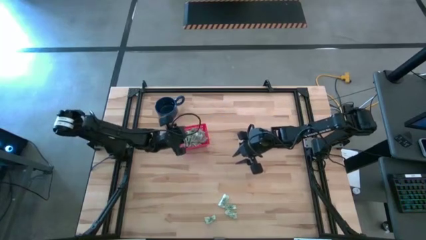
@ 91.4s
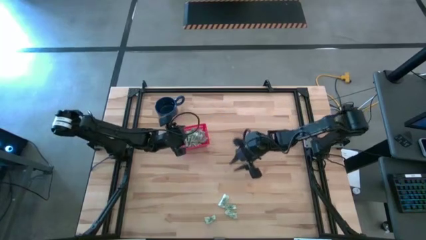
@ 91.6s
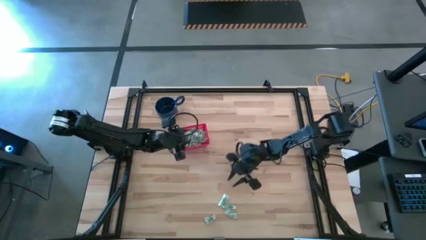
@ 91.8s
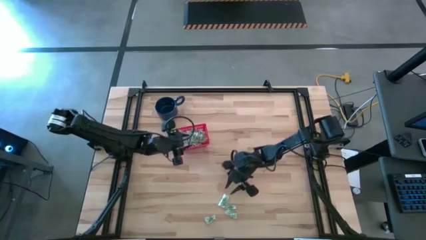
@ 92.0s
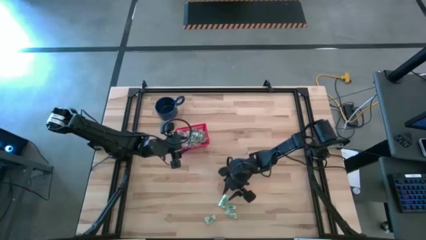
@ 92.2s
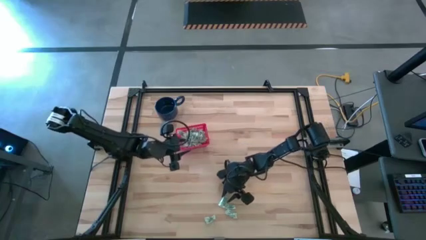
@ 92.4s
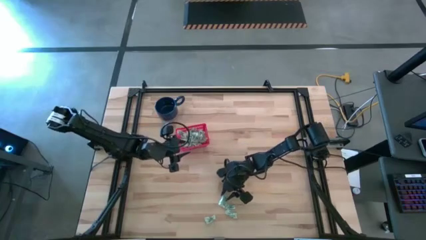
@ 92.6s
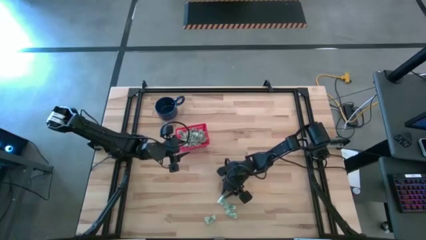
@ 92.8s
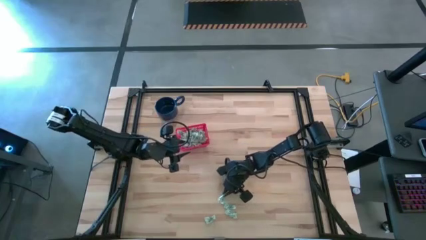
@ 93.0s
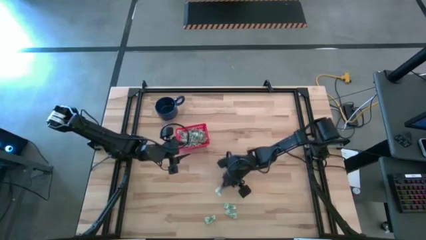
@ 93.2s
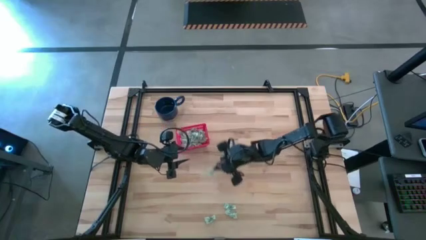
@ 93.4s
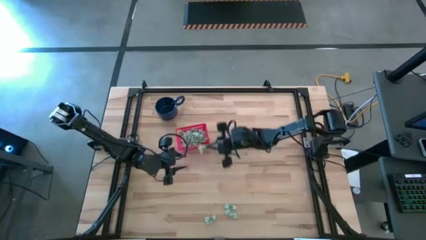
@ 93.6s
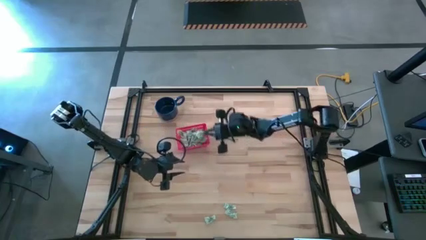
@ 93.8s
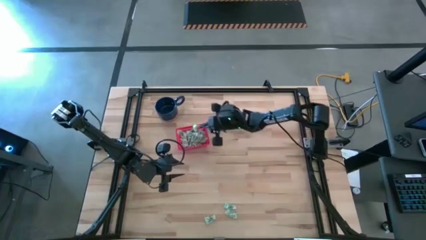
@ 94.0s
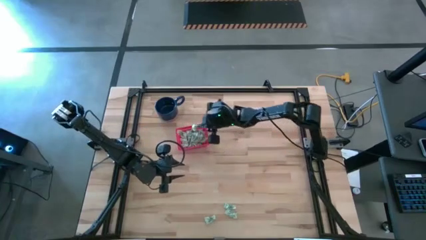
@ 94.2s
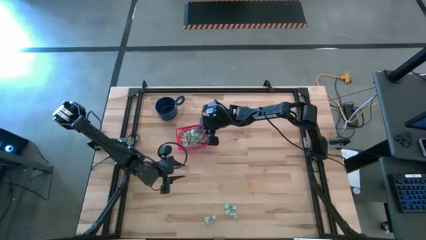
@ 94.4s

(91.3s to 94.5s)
Task: Pick and place items into bin
Put the green stevia packet into the red bin

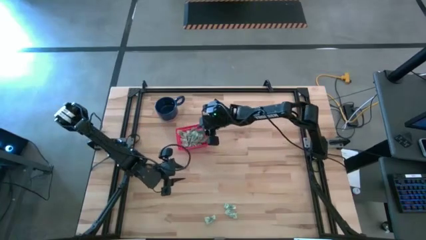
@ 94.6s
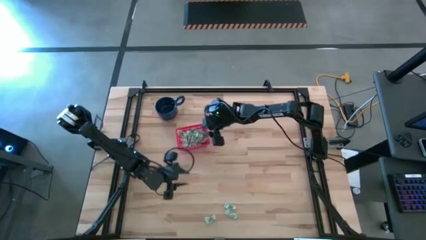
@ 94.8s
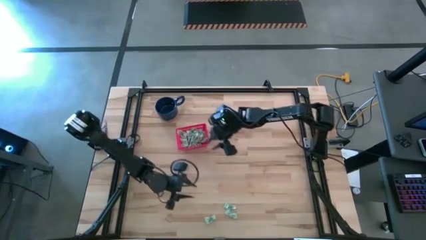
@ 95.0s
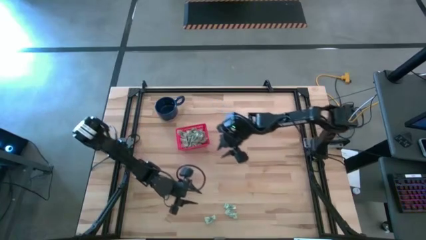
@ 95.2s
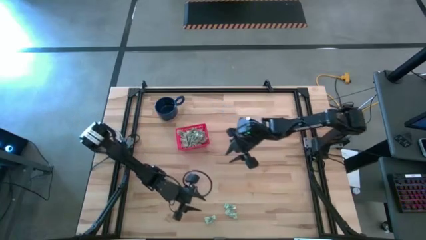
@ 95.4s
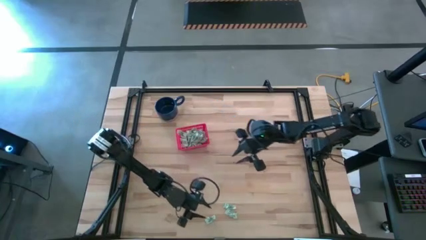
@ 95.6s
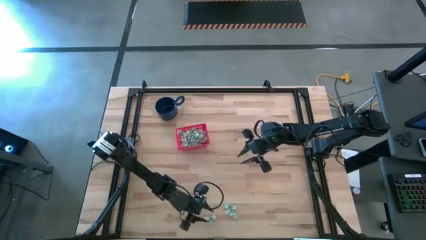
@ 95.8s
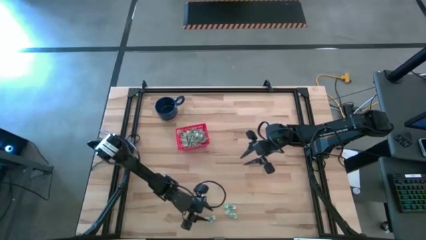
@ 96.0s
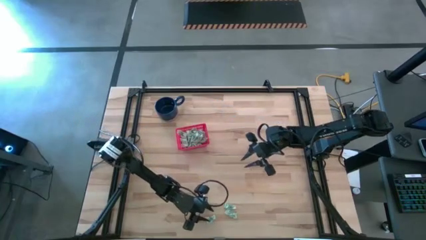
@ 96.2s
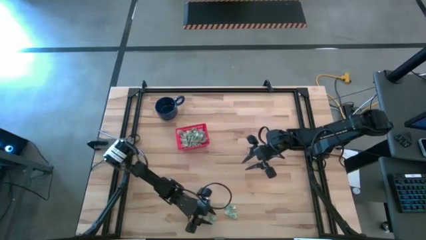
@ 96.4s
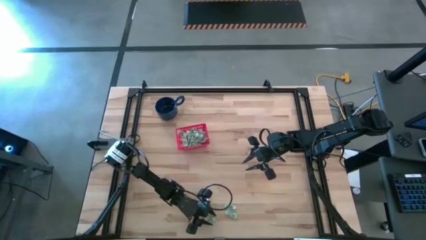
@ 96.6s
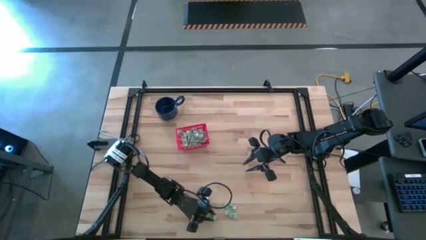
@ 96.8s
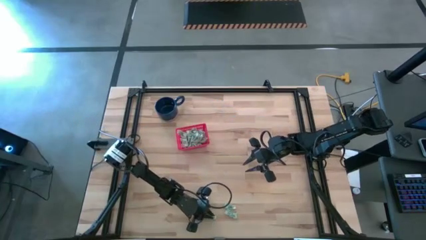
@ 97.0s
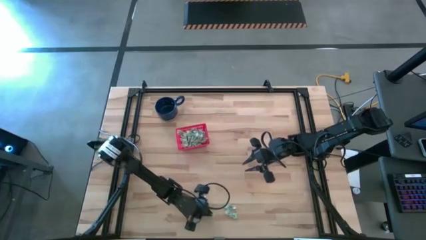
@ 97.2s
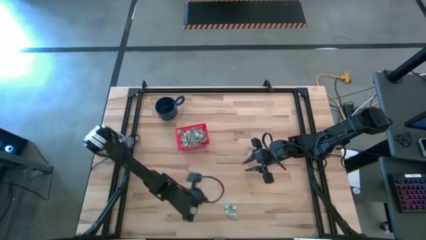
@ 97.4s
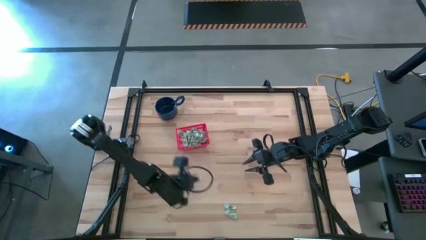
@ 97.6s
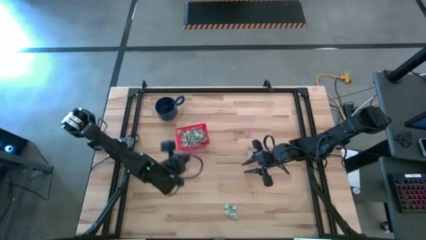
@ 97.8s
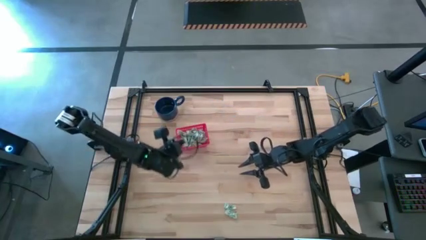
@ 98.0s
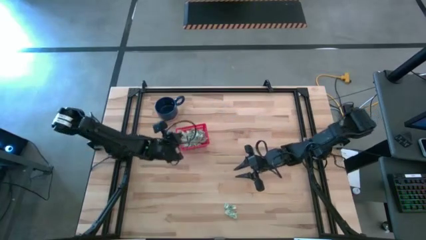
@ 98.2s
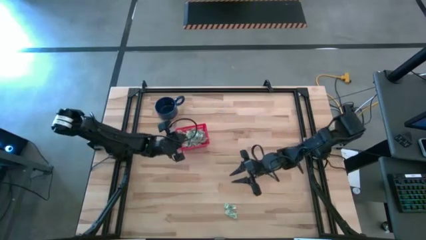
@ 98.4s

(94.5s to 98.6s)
Put the green stevia packet into the red bin

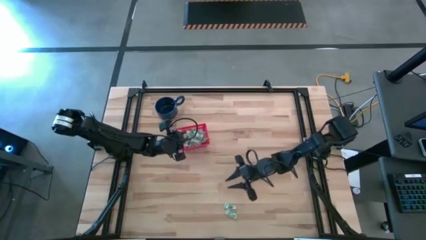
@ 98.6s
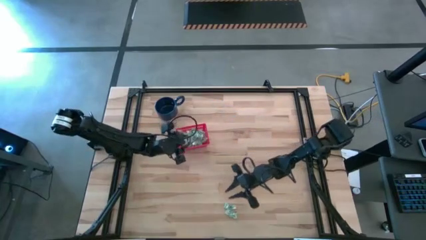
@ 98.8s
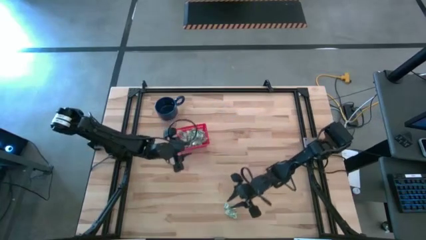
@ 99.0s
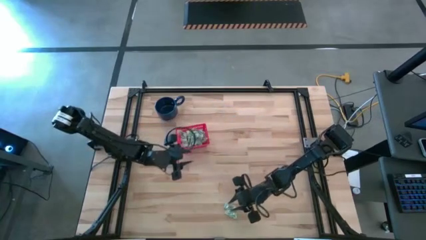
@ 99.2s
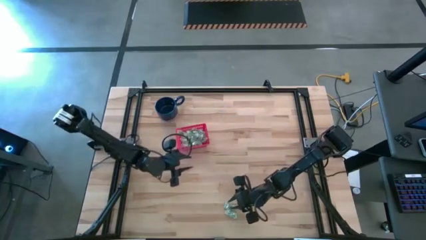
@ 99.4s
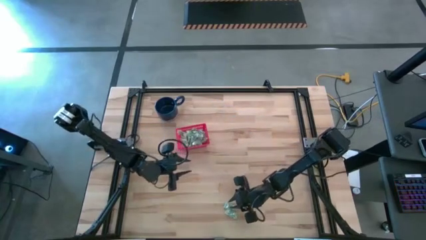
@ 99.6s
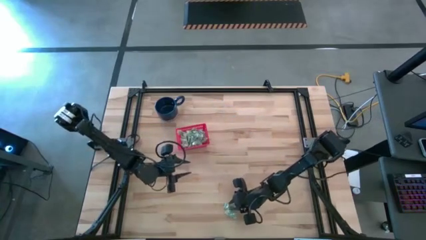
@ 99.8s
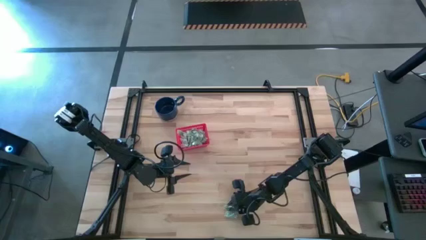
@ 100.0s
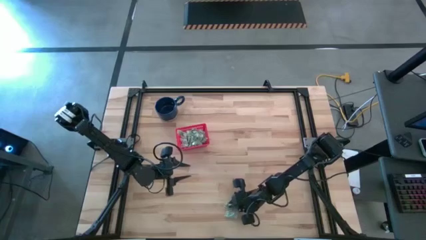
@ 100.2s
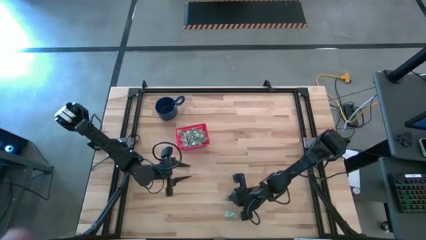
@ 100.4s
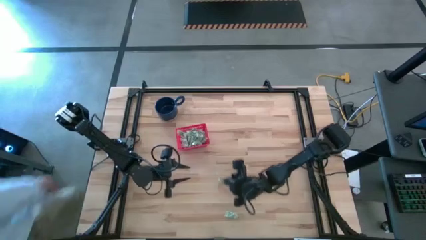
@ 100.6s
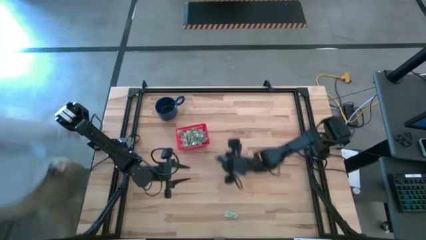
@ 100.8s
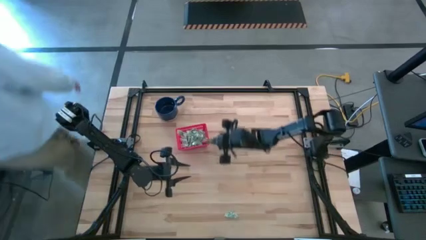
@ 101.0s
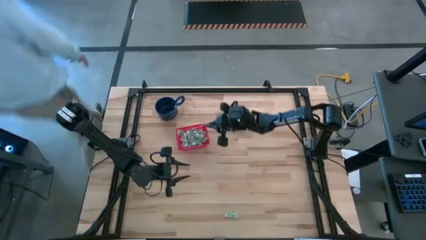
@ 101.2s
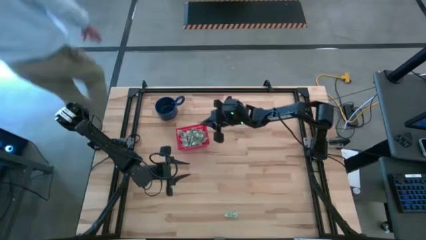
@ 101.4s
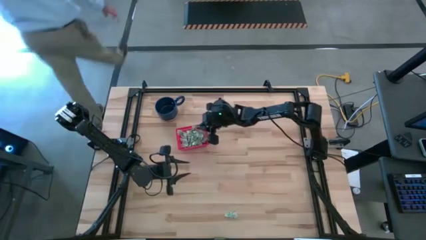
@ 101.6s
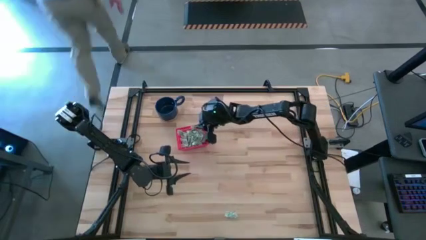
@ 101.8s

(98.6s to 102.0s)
Put the green stevia packet into the red bin

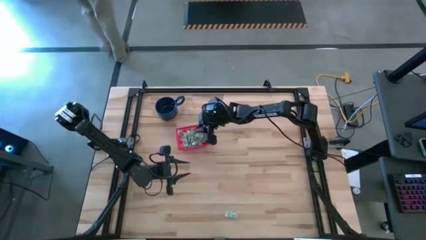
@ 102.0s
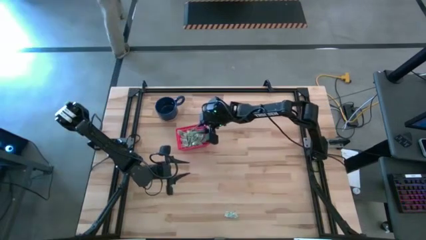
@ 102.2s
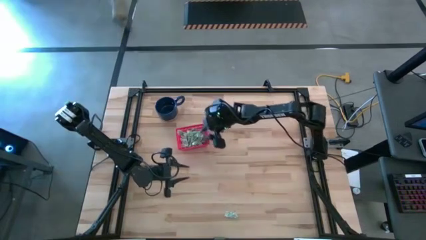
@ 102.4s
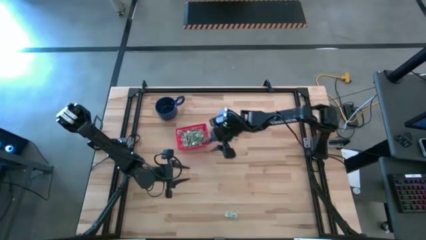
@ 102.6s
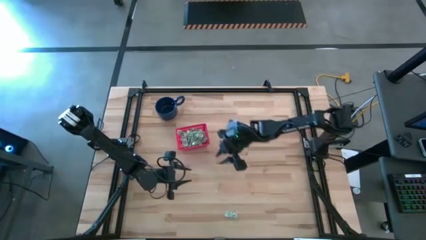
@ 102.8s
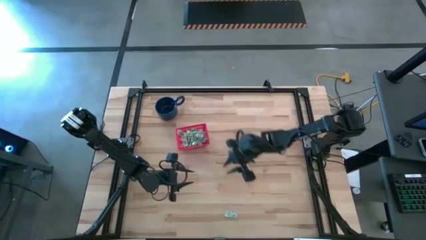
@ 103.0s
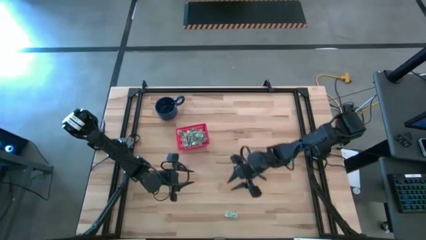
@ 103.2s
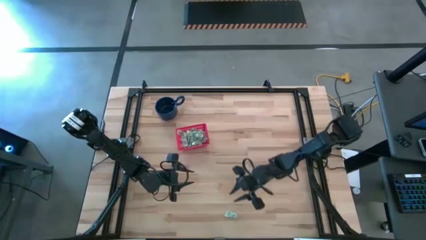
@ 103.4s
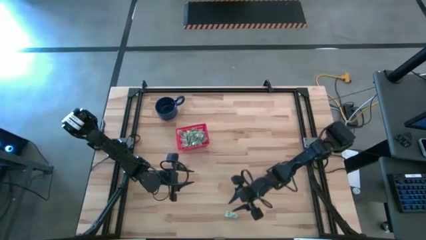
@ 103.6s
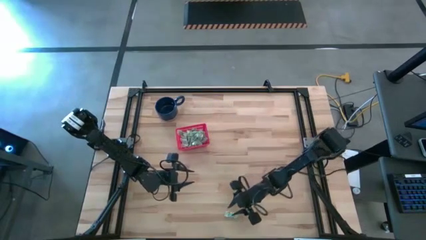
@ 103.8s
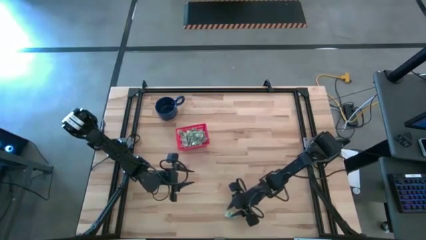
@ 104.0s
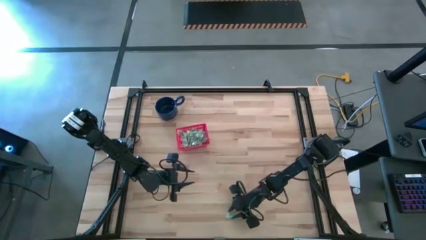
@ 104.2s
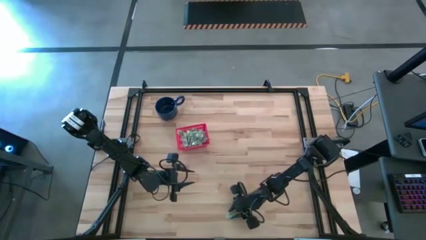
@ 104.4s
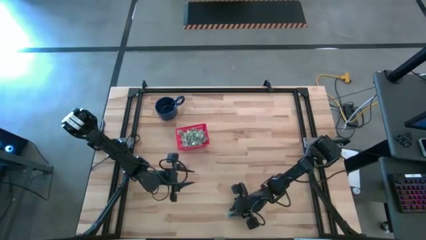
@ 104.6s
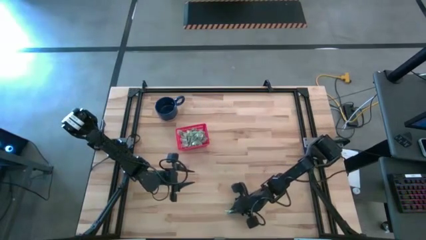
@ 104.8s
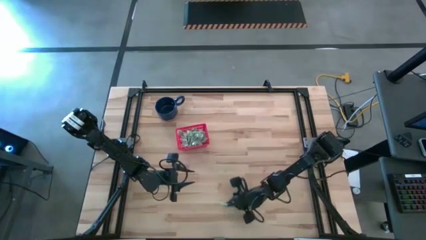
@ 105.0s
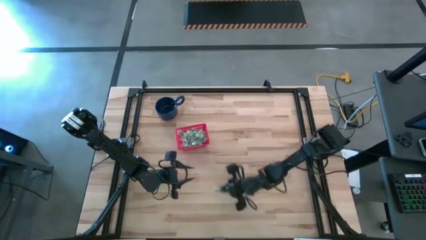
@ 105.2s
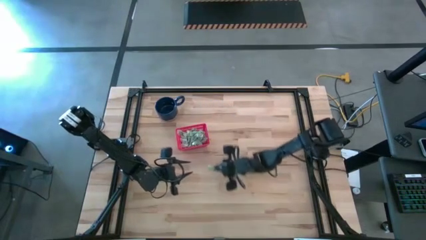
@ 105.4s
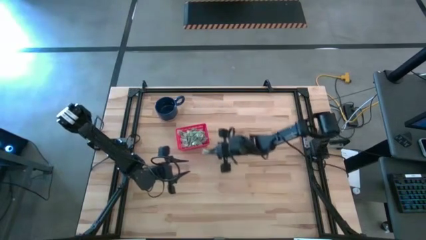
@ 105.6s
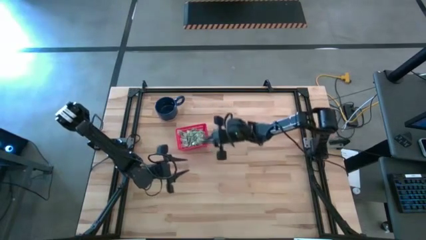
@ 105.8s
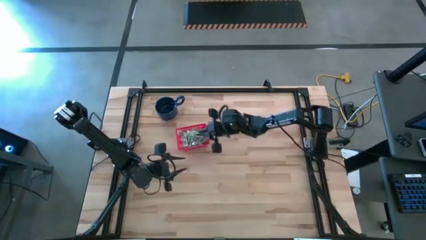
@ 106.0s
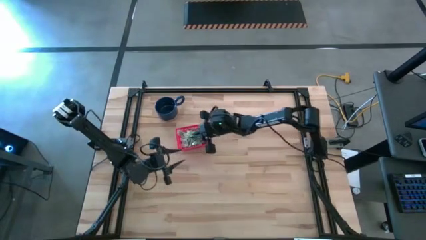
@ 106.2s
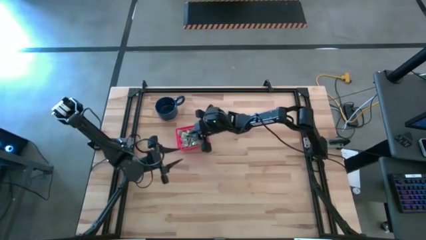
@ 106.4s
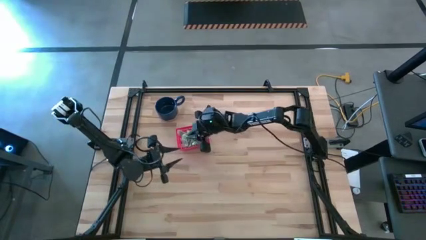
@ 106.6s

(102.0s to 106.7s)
Put the green stevia packet into the red bin

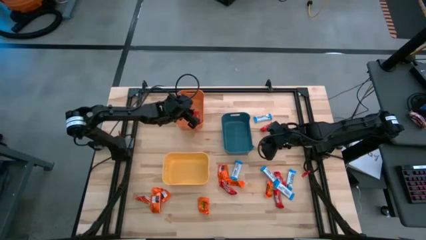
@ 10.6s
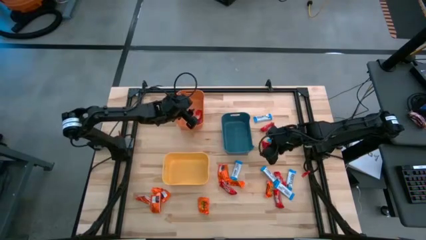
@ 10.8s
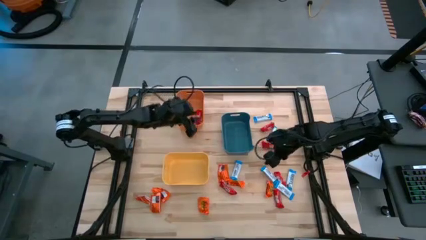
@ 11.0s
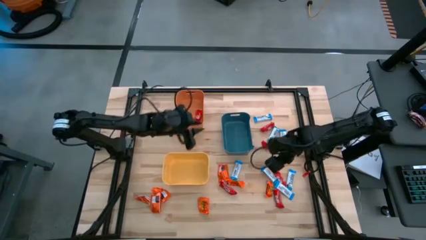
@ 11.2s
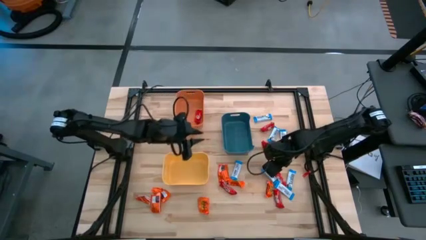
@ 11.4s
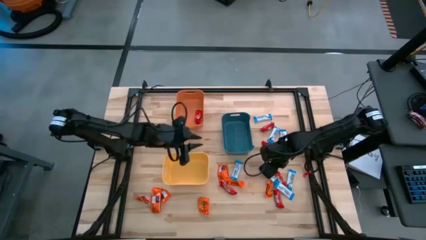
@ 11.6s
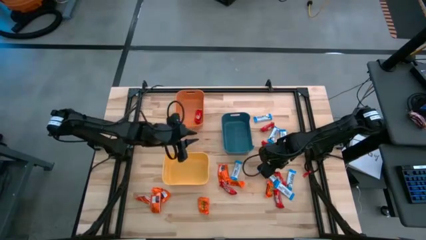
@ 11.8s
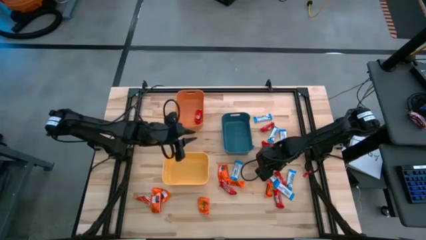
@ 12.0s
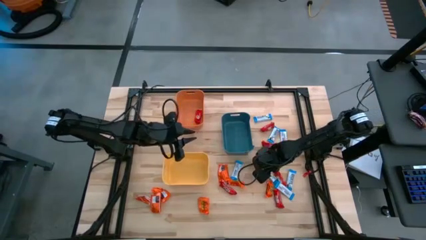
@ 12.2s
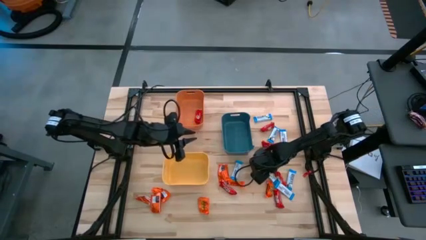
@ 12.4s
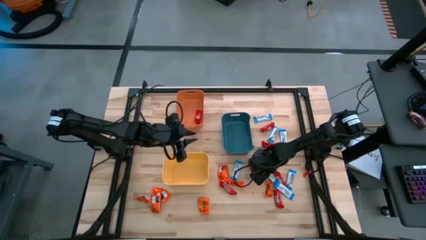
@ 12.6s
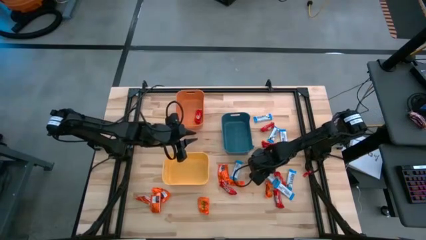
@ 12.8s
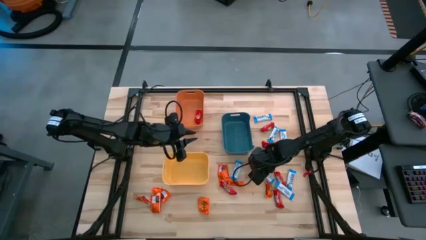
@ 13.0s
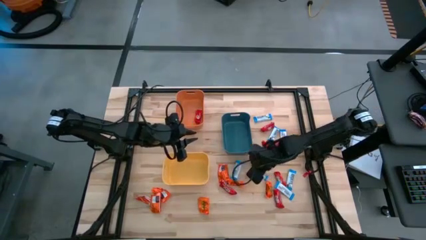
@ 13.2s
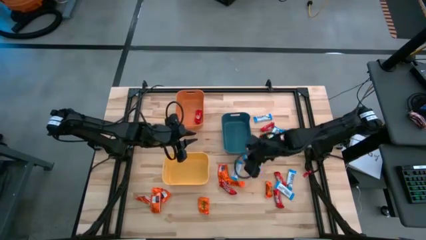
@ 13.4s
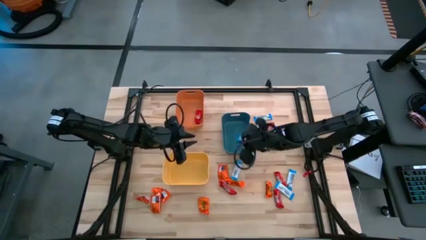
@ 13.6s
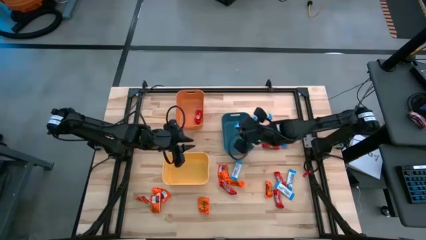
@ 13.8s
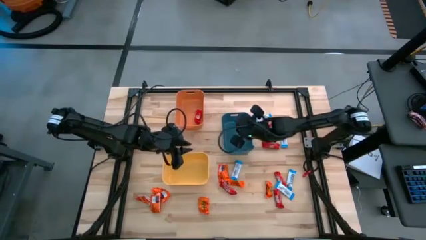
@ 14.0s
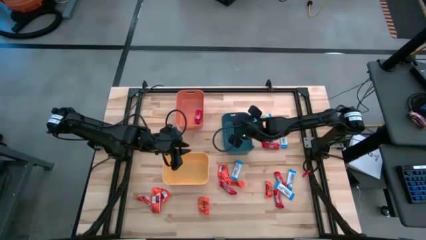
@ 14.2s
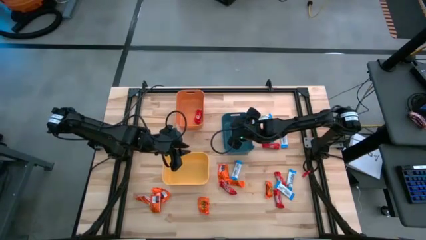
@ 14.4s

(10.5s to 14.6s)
Task: Organize candy in baskets
Put the white chocolate into the blue bin
